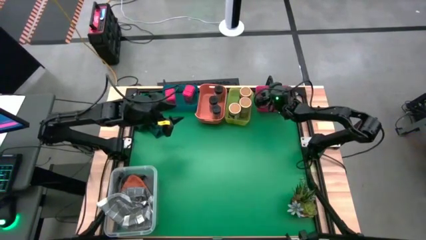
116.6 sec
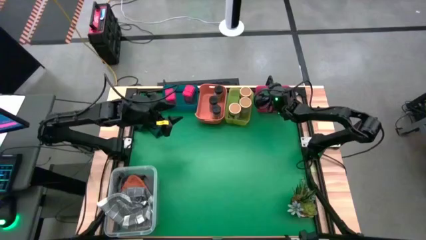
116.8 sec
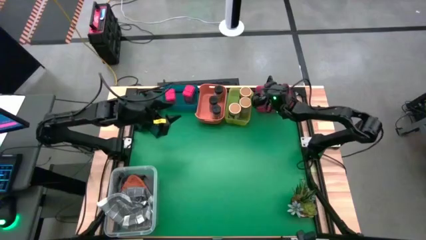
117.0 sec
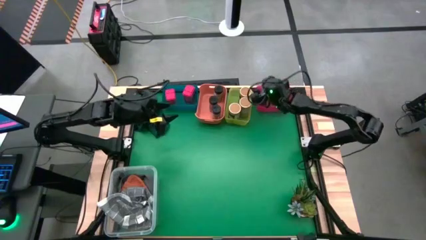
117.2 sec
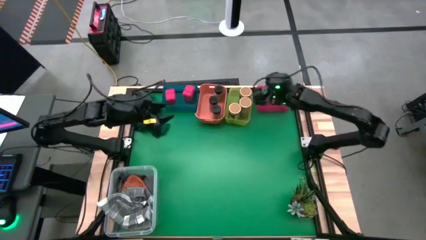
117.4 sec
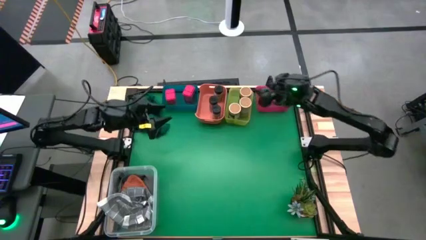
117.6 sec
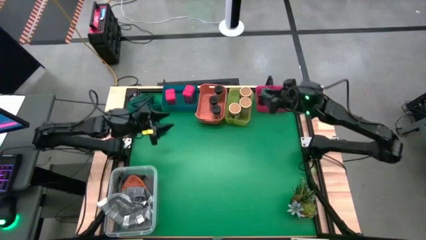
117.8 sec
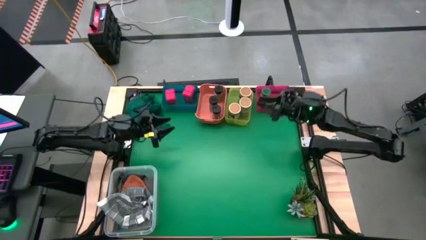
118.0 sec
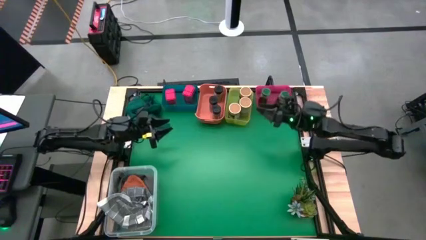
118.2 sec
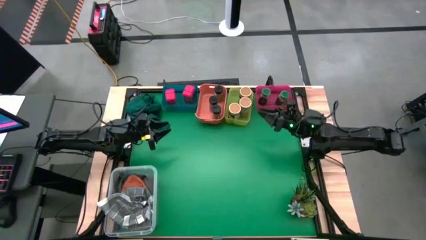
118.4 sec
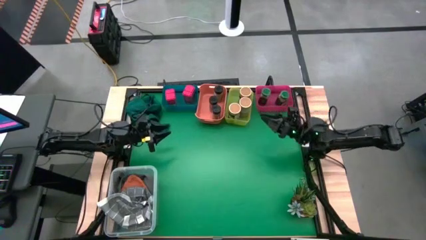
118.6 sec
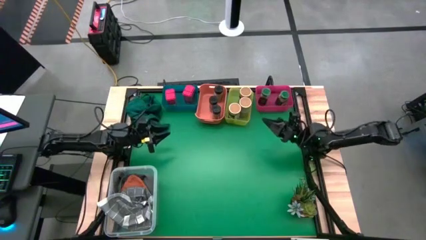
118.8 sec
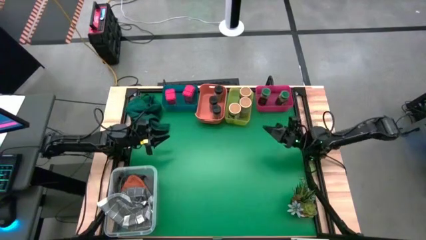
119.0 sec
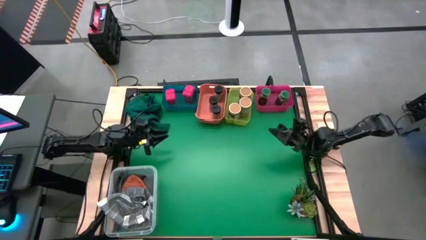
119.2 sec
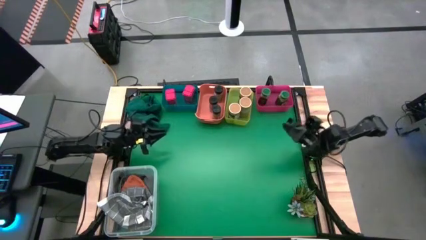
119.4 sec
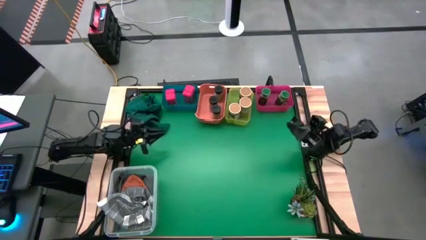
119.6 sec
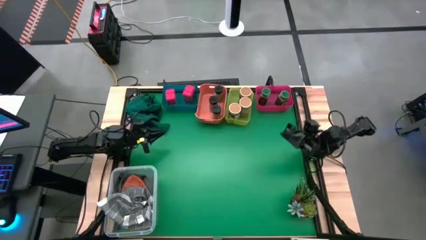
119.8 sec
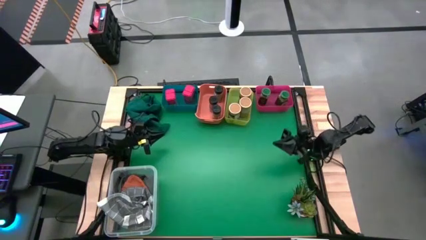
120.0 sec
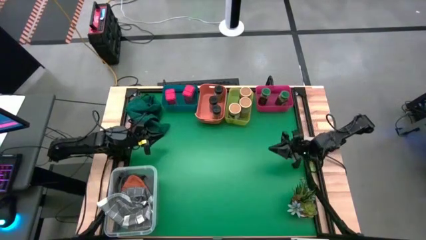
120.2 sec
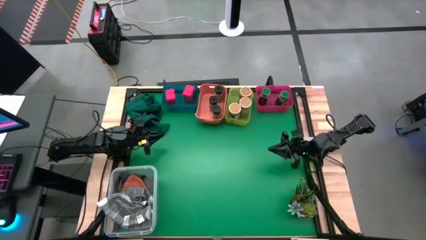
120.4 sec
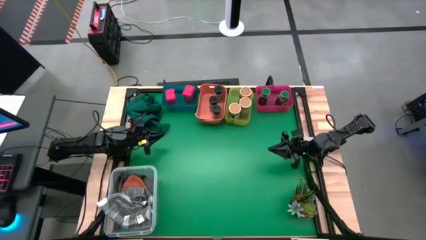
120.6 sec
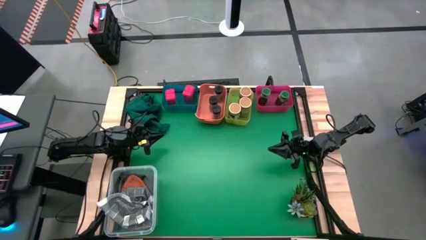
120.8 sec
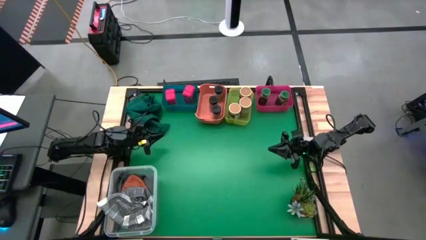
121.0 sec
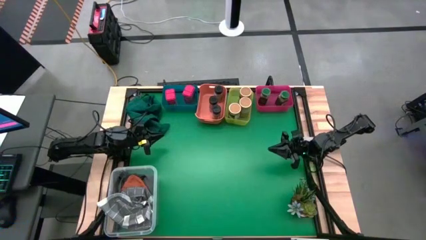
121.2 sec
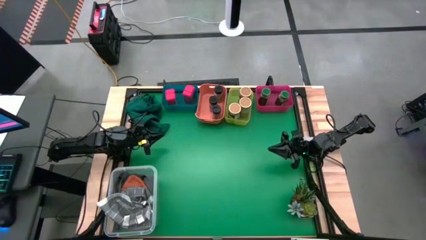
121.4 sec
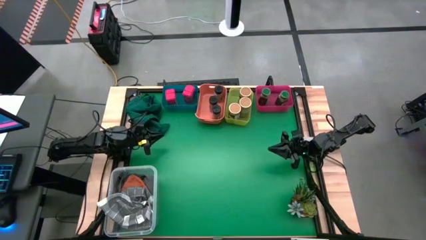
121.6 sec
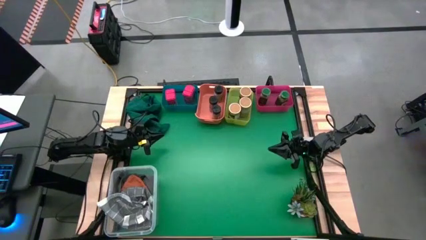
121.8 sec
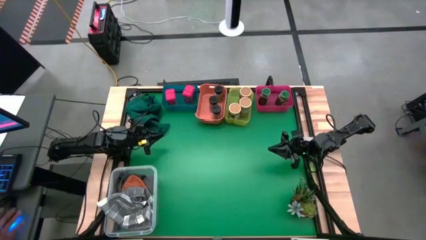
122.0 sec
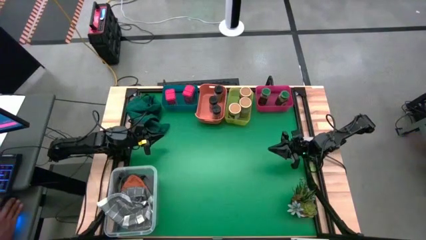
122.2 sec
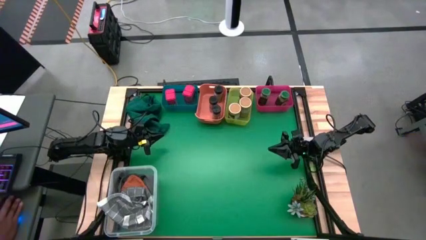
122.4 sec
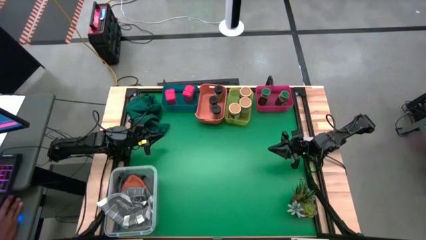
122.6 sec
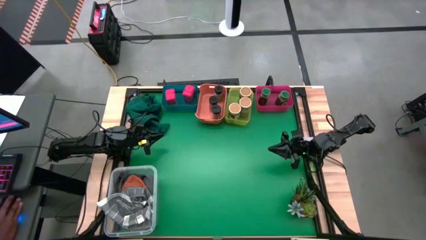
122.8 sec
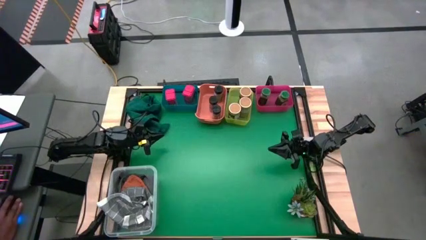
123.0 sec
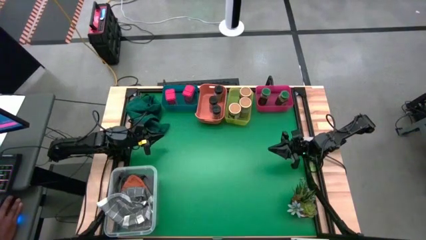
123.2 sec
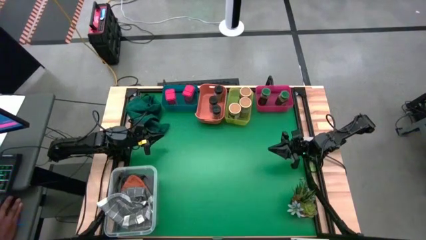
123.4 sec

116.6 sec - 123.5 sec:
Task: Sort spices by type
Return to Home Position

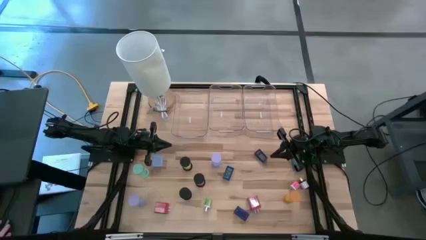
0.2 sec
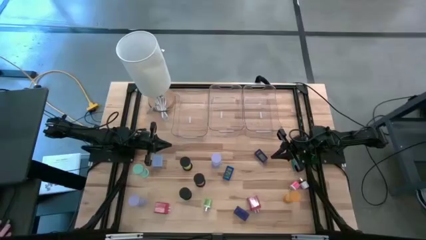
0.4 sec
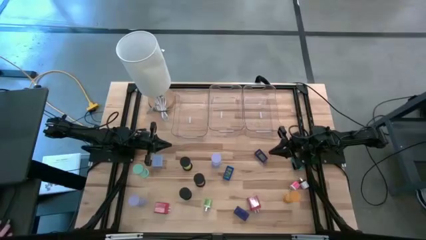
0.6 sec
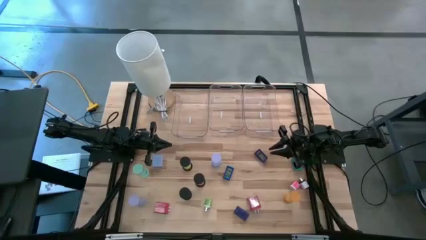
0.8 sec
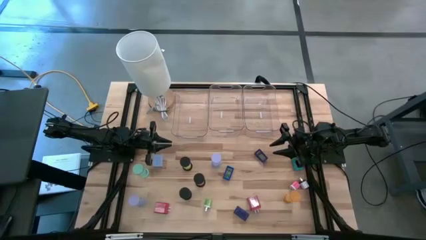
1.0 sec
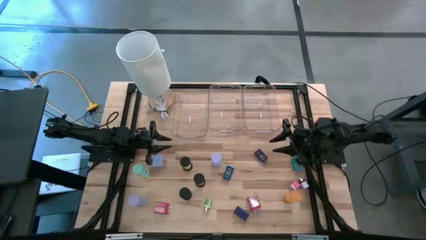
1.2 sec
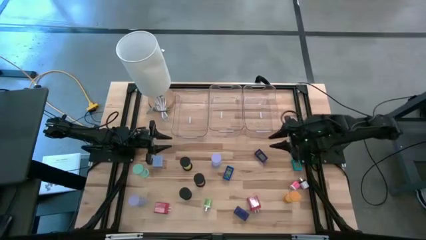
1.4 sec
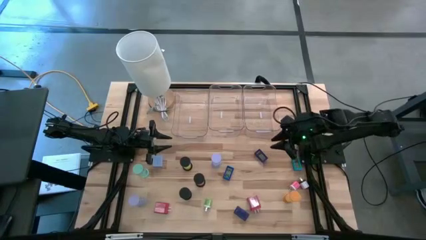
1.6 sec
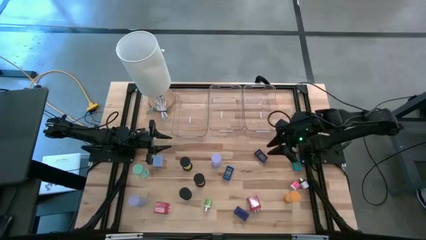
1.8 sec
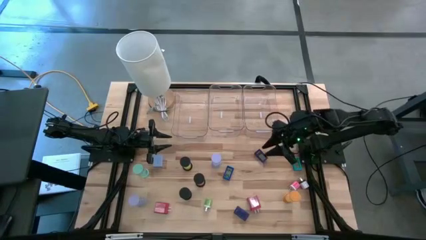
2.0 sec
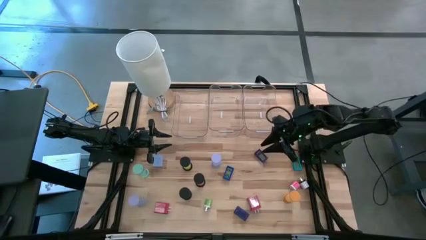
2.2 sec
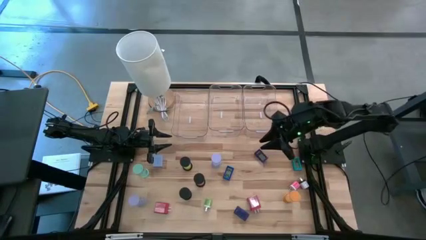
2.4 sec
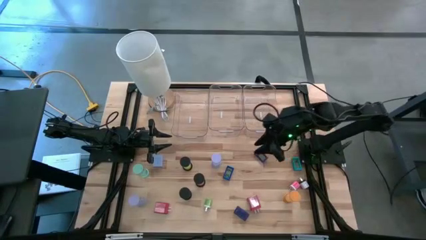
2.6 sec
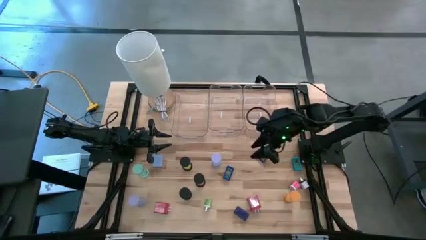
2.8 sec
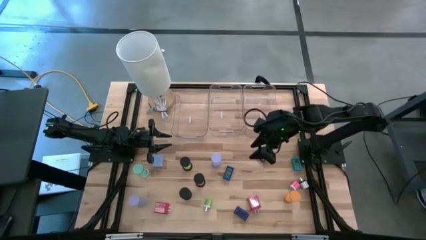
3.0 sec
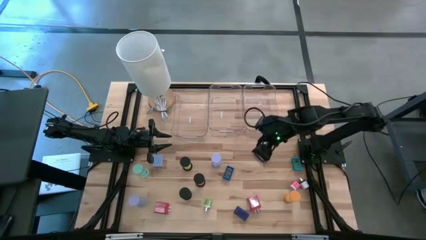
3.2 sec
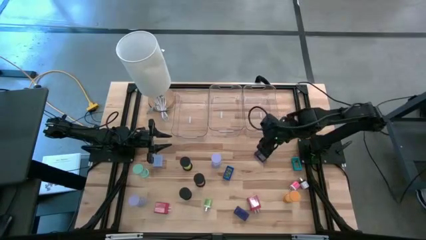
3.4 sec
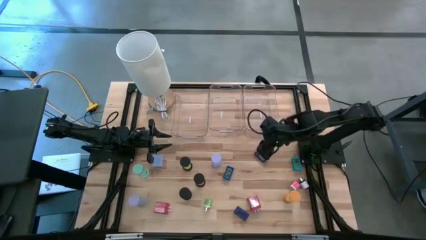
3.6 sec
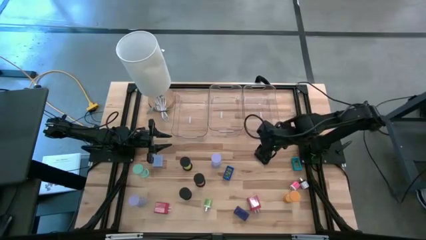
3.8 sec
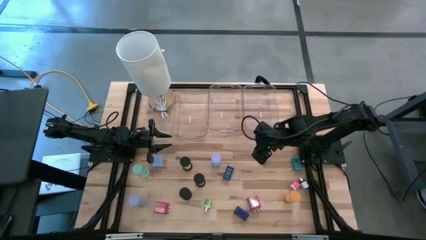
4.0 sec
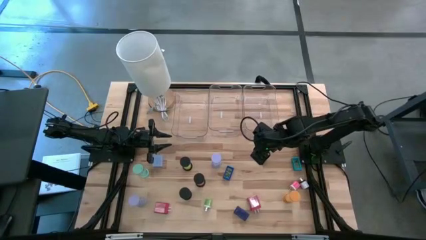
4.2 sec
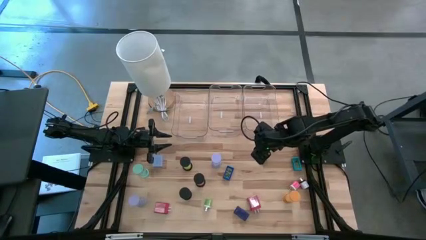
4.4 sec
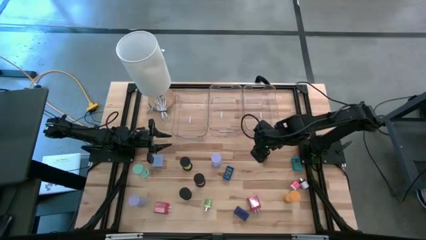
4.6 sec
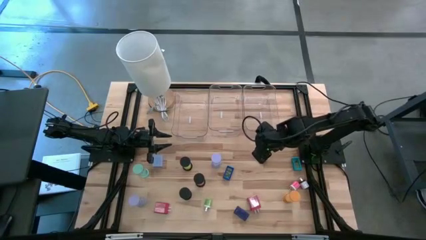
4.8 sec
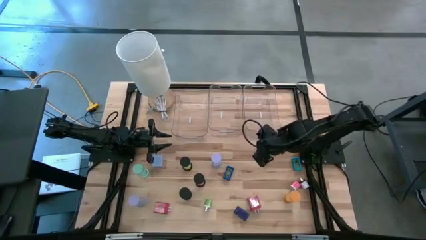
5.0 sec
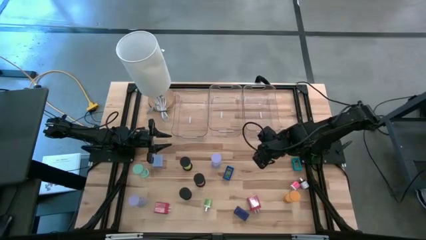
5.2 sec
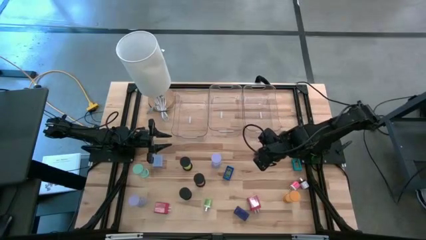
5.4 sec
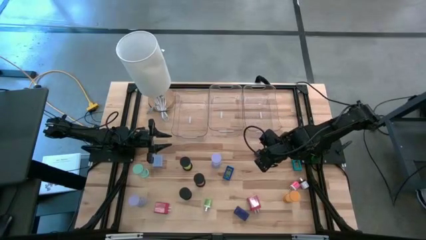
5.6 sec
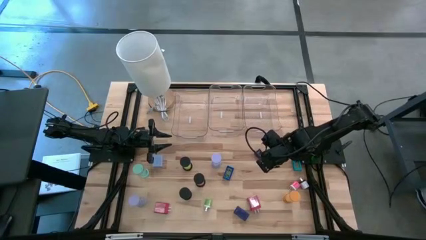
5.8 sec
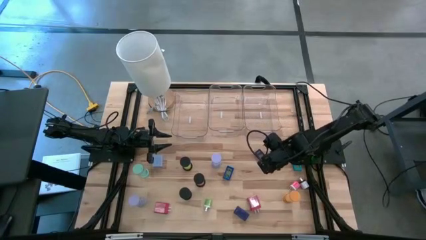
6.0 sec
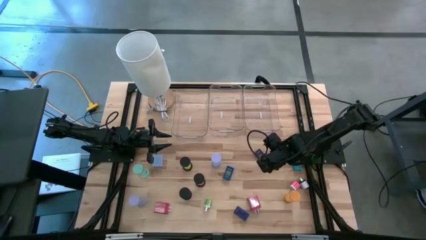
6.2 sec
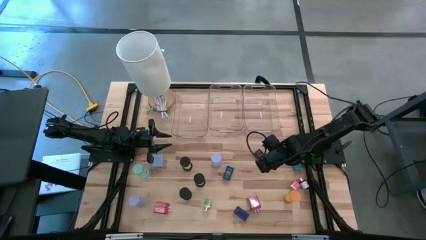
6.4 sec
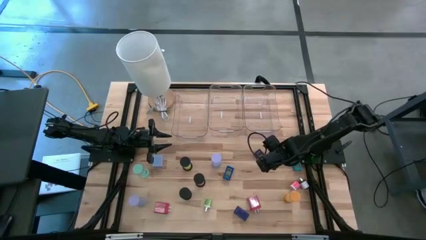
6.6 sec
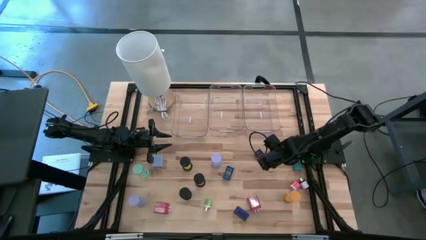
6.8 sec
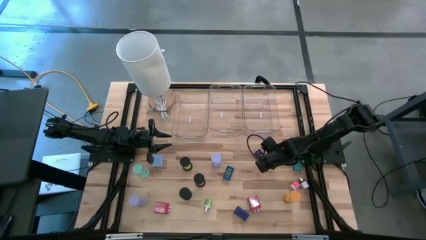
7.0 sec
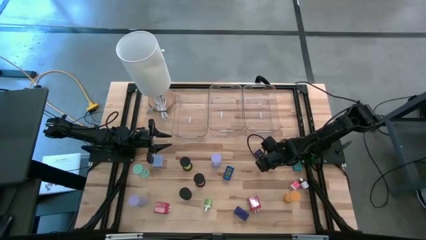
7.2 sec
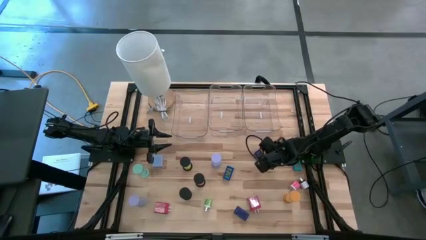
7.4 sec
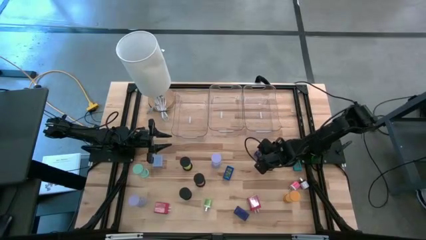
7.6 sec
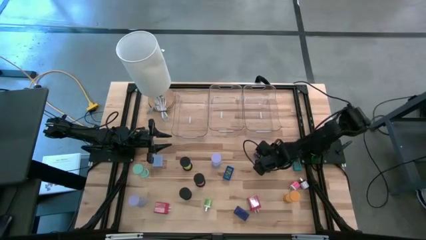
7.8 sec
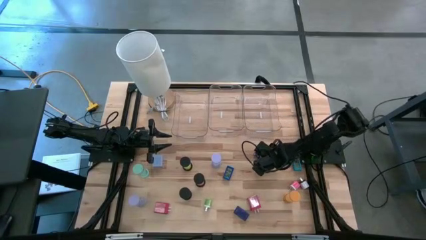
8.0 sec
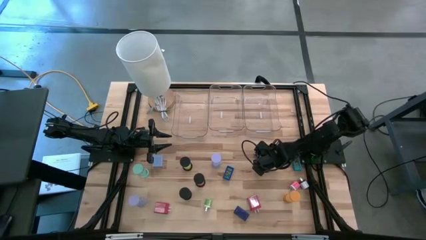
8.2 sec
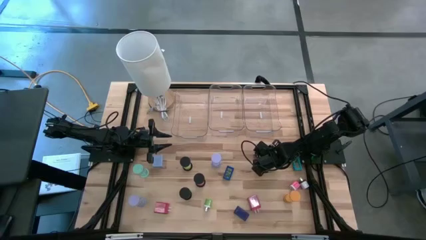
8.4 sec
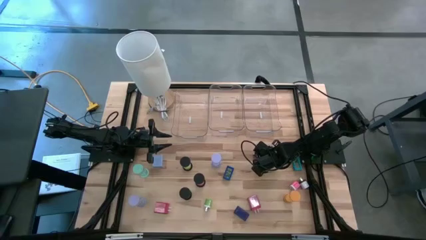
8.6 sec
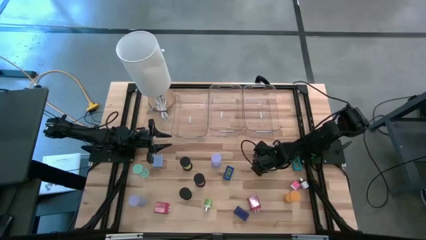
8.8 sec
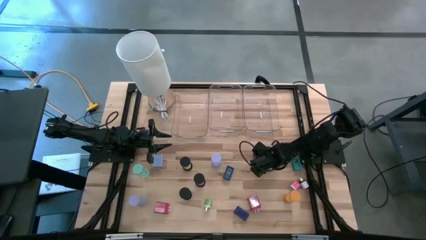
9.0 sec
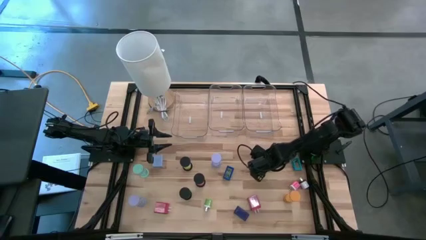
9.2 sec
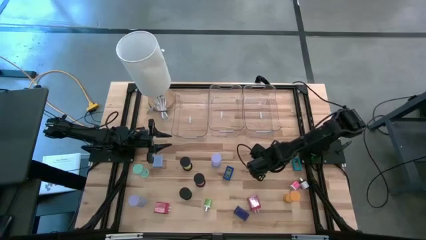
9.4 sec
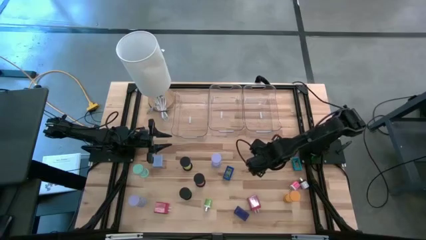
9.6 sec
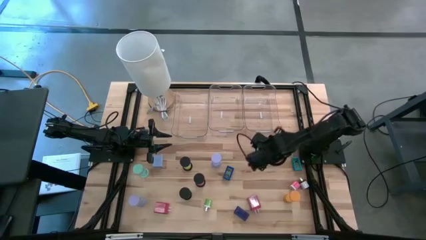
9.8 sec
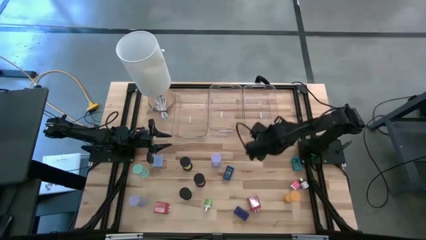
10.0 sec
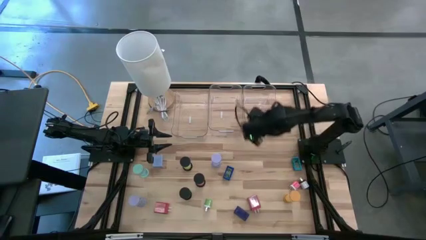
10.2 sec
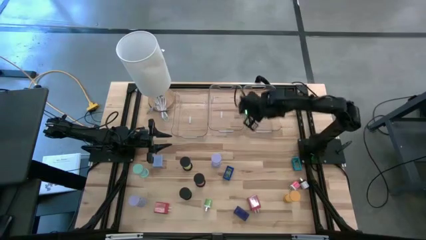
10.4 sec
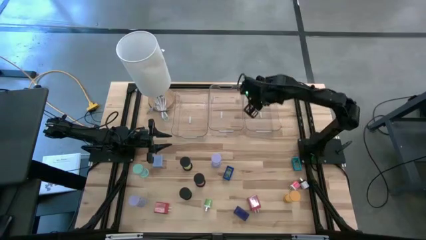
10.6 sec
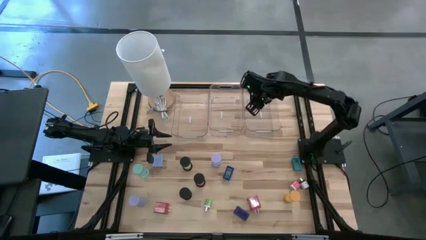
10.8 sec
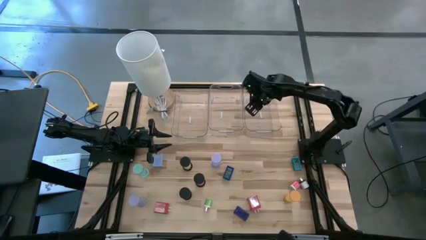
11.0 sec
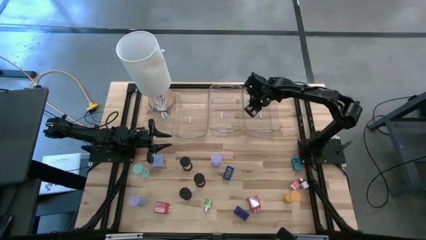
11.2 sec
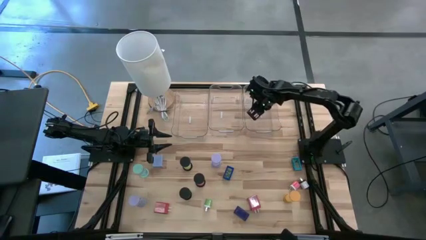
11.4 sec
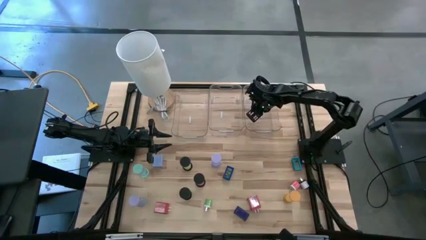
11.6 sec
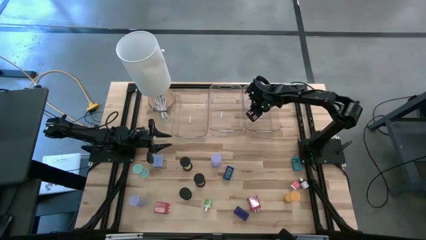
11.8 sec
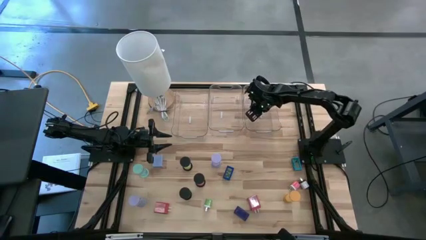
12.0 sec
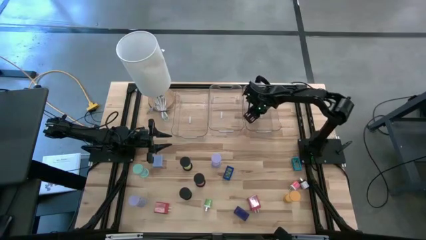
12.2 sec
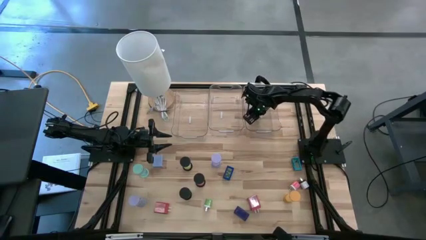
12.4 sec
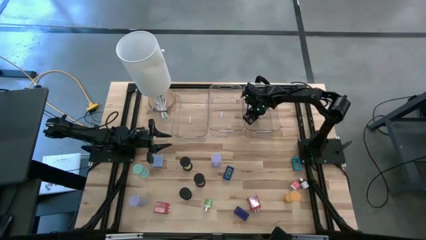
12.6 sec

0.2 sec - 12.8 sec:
Task: Pick & Place Office items
Put the top dark blue digital clock into the right transparent bin
